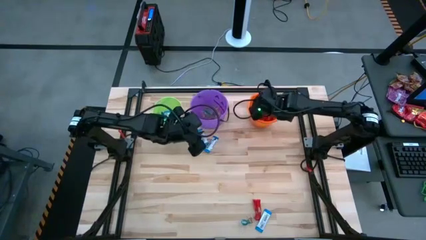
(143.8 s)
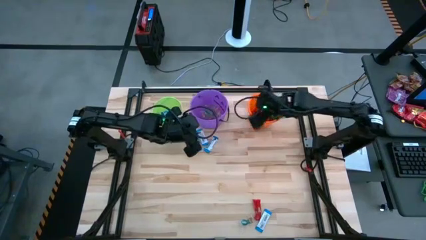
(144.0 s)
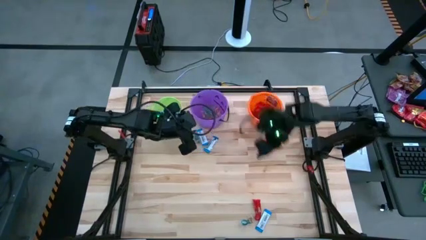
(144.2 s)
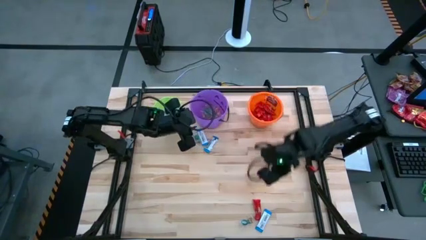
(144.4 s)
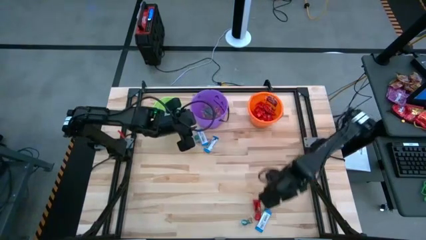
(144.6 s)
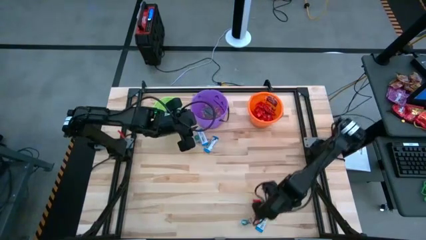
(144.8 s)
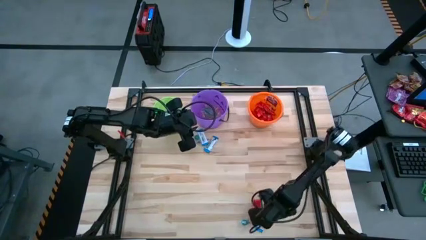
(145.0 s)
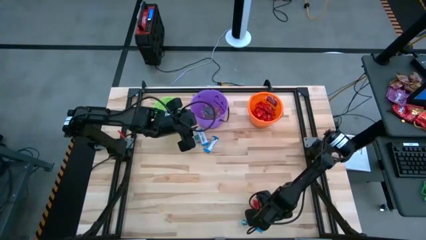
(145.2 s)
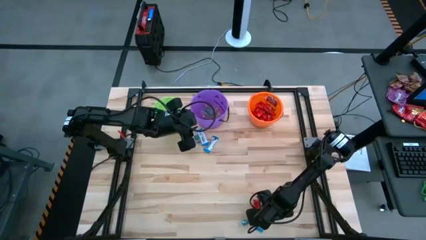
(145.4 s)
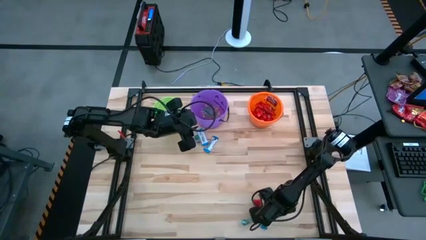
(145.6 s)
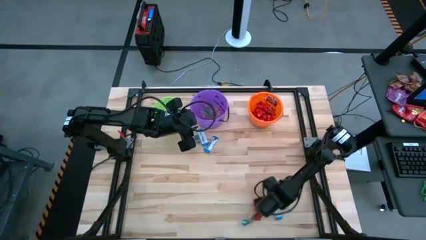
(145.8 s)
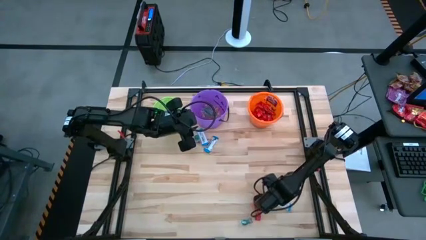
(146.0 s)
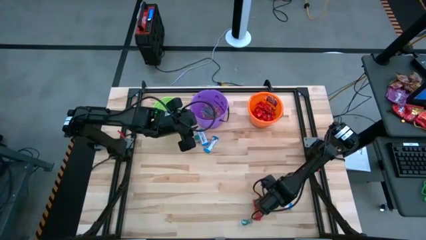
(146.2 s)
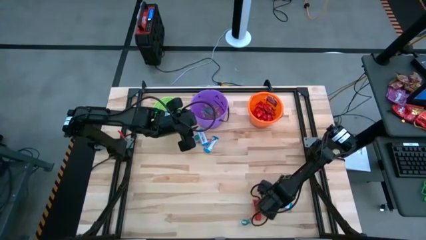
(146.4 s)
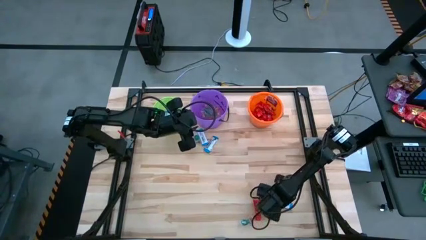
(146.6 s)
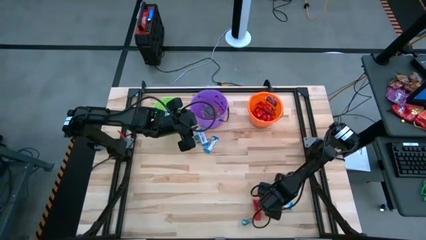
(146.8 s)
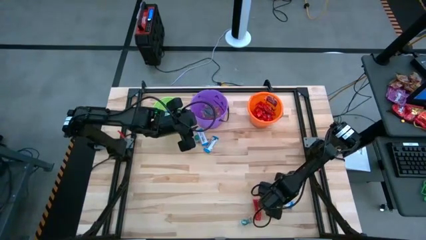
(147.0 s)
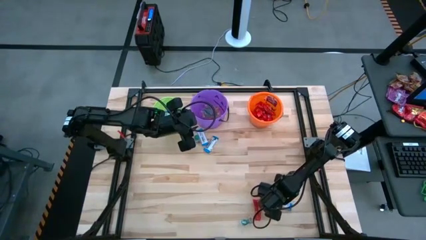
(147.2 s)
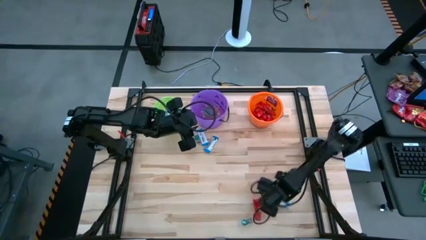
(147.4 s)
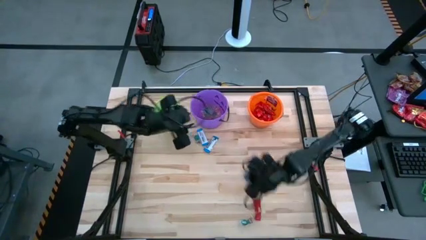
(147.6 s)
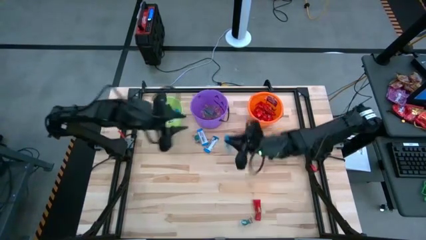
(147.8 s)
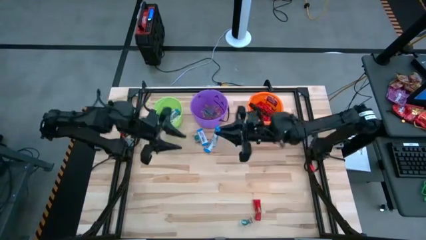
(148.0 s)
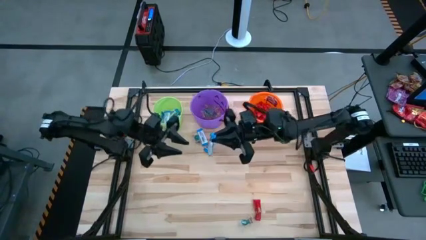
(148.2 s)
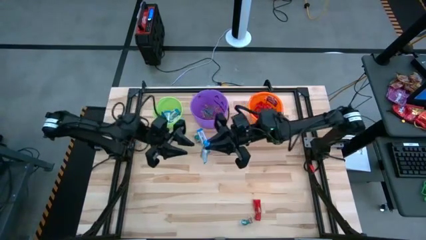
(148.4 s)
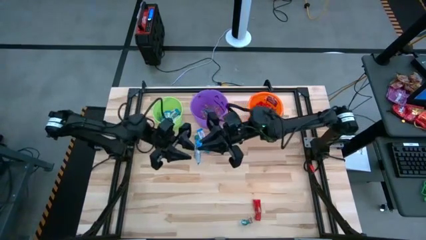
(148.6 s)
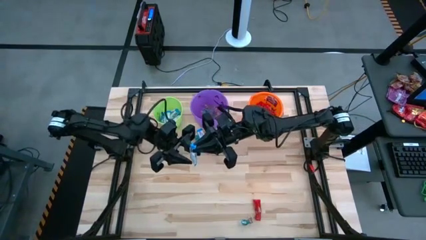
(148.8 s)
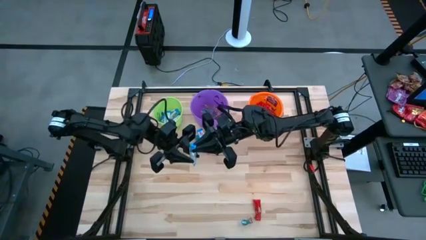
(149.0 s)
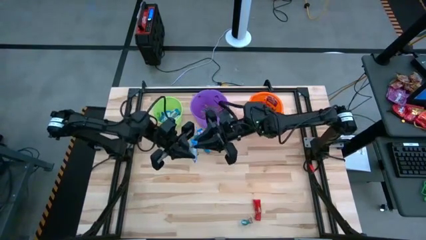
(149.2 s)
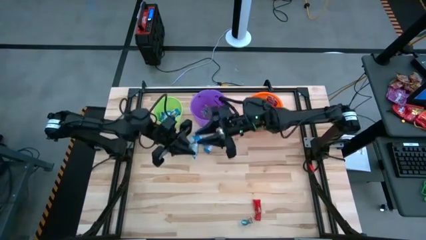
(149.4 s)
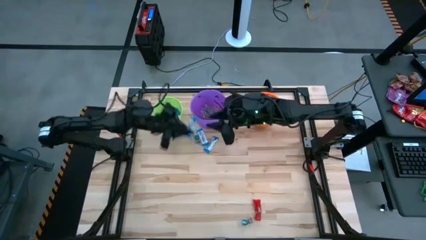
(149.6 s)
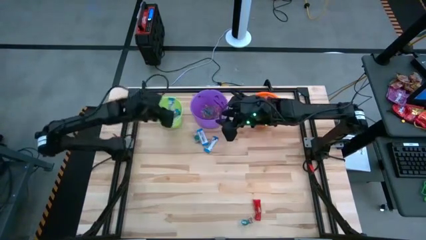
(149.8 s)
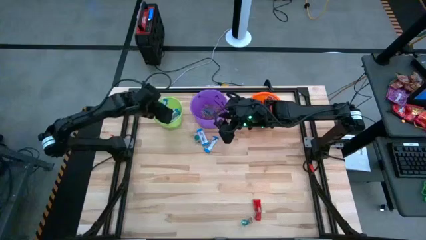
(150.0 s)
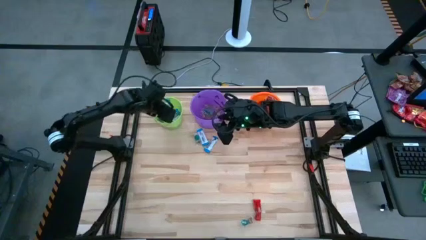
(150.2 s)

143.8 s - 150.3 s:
Task: Sort candy by brand, put in halloween buckets
Put the white chocolate into the green bucket

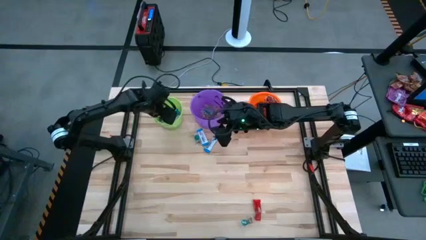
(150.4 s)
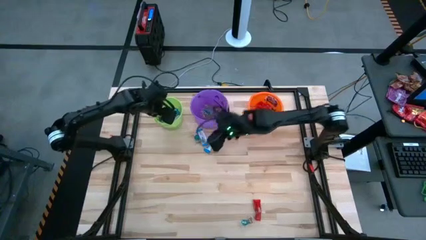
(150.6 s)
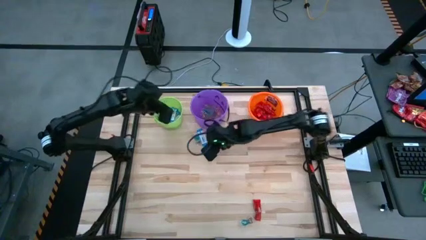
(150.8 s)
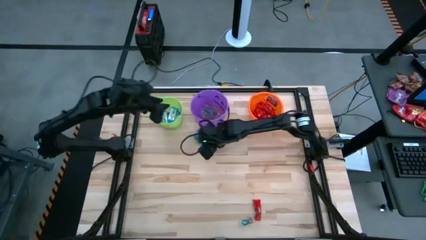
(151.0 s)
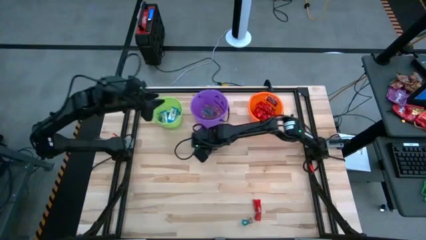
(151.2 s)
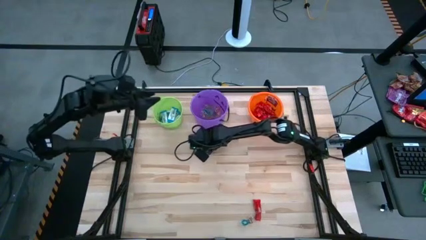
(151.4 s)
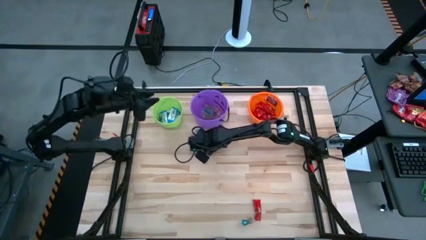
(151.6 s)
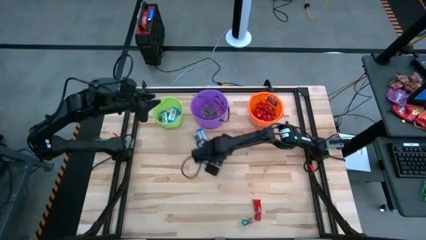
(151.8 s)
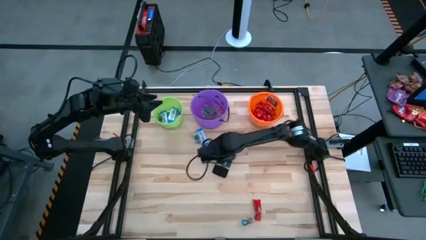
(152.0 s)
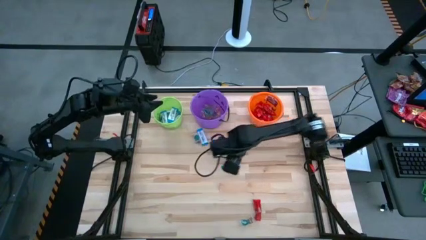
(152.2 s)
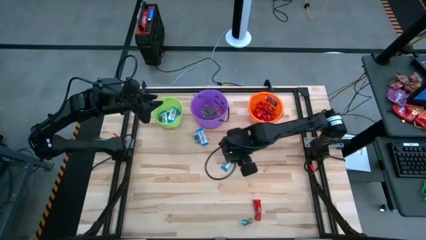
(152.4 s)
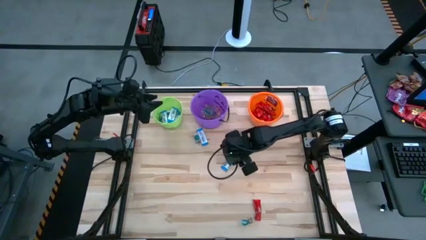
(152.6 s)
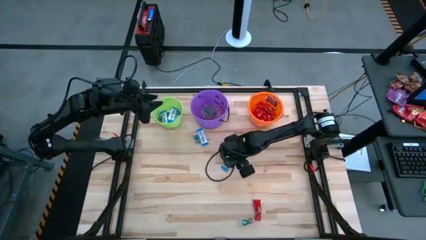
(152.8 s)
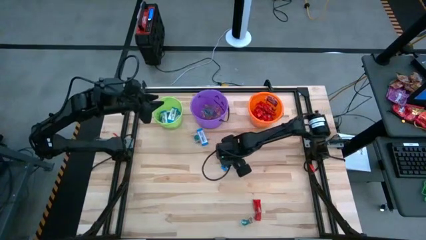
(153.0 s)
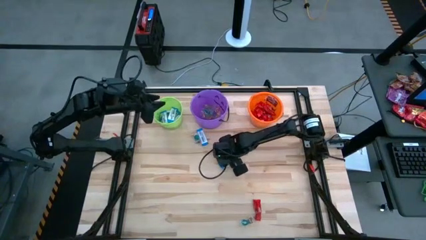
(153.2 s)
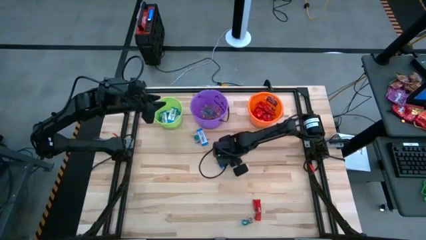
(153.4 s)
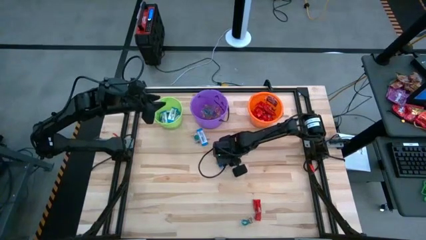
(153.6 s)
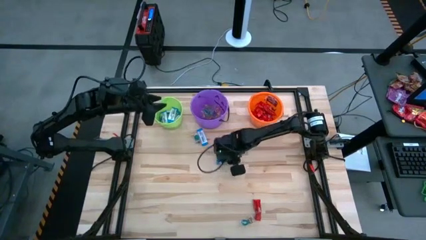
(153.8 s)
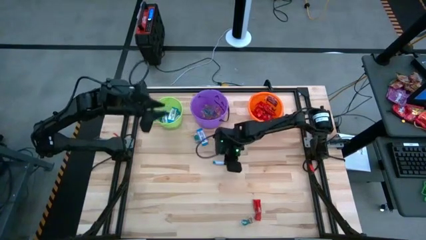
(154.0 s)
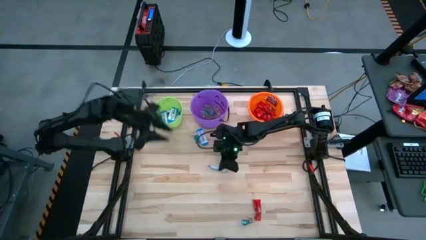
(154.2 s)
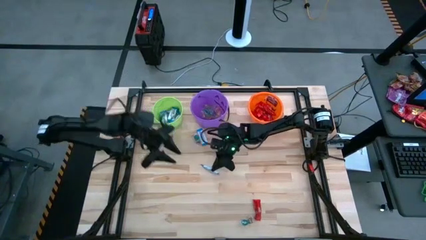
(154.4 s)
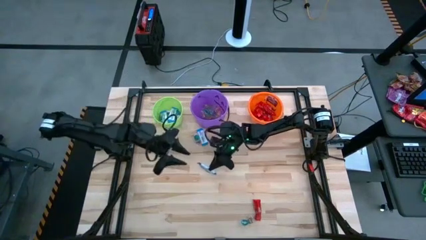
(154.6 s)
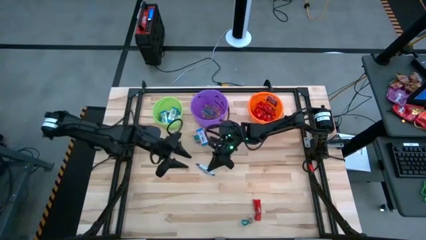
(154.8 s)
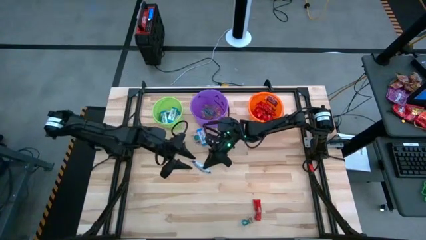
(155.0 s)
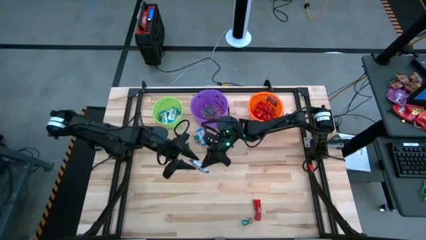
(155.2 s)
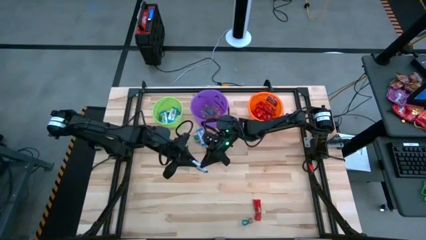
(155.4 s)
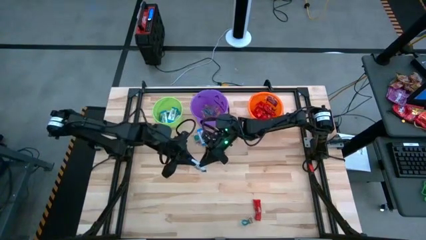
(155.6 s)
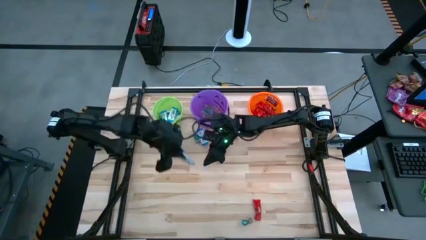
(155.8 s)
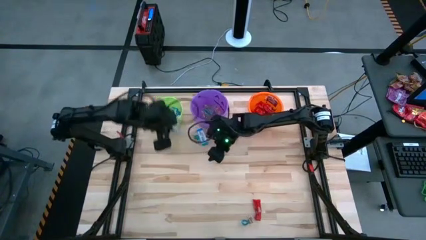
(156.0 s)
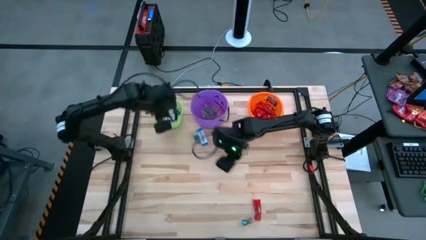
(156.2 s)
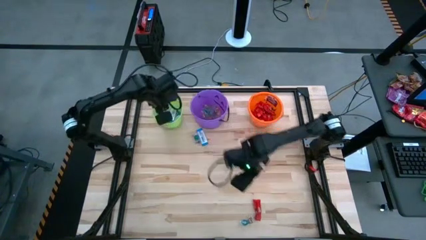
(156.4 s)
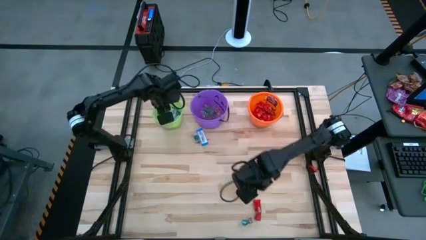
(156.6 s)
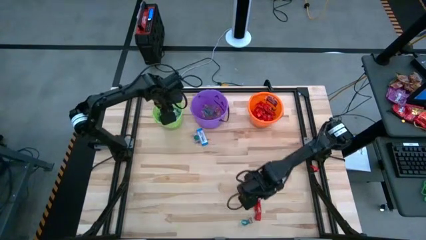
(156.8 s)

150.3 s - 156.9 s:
Put the white chocolate into the green bucket

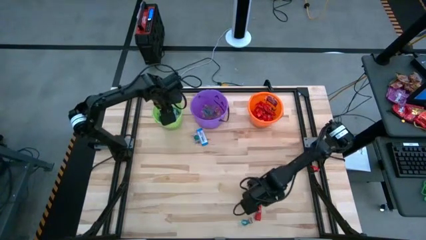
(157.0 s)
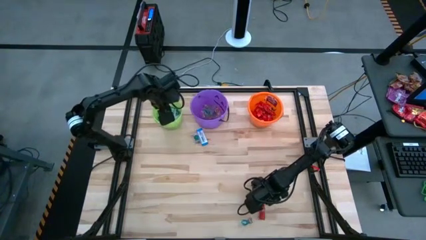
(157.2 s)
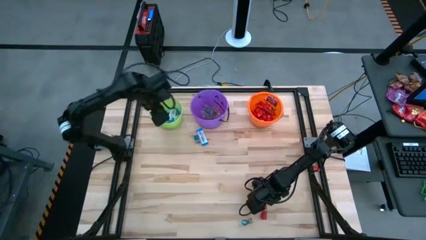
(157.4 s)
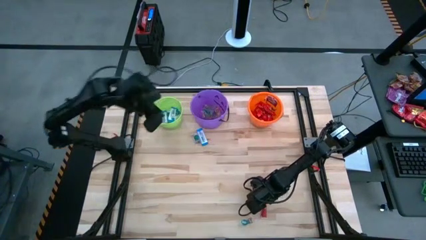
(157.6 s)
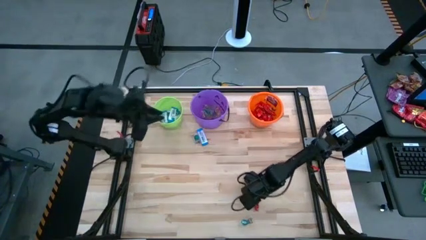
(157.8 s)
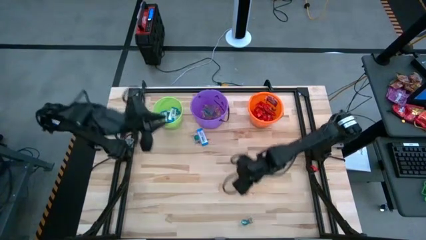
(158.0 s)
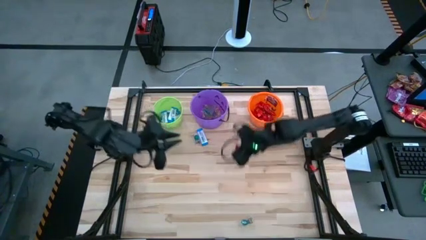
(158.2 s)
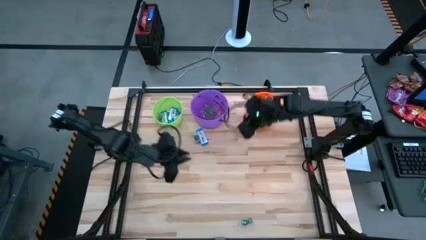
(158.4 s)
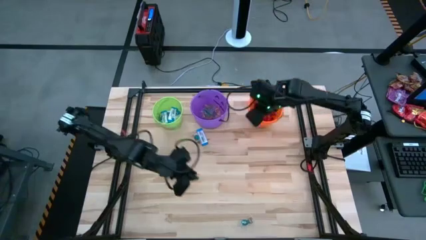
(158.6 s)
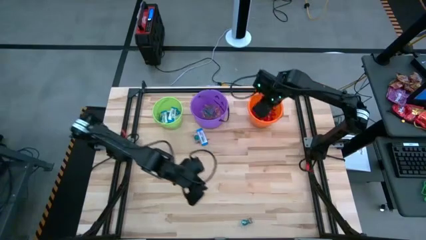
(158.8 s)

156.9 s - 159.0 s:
Put the red chocolate into the orange bucket

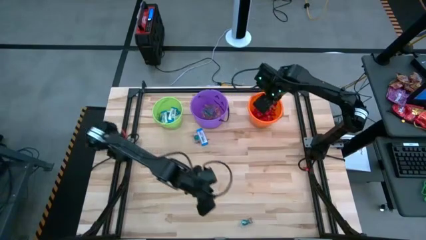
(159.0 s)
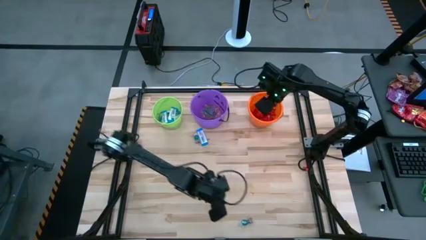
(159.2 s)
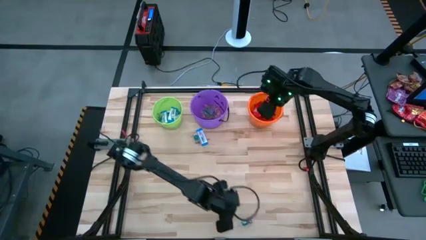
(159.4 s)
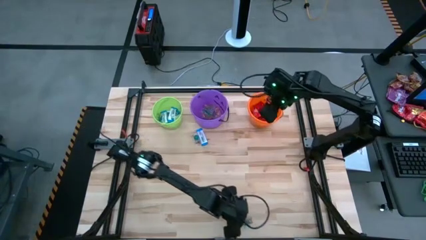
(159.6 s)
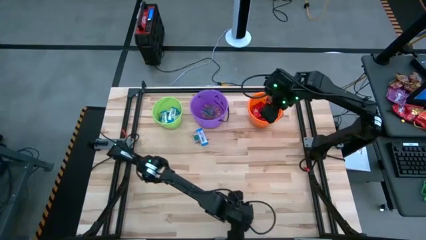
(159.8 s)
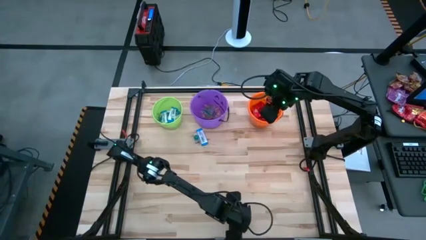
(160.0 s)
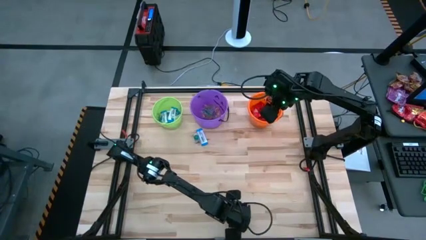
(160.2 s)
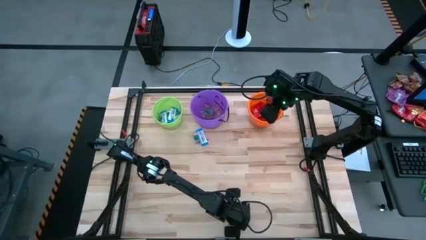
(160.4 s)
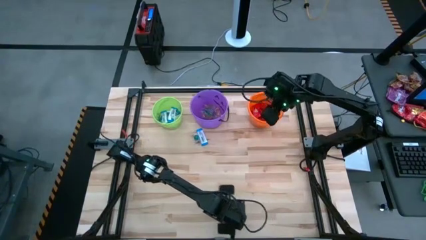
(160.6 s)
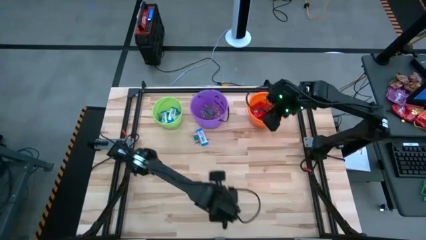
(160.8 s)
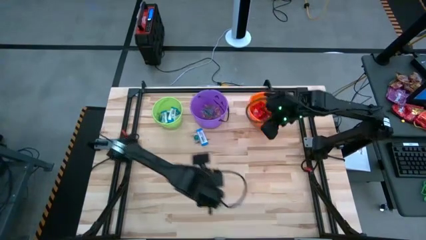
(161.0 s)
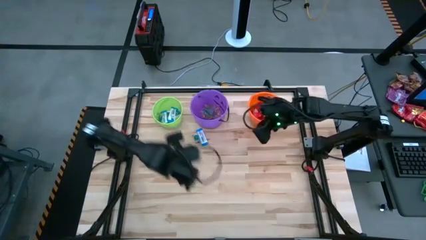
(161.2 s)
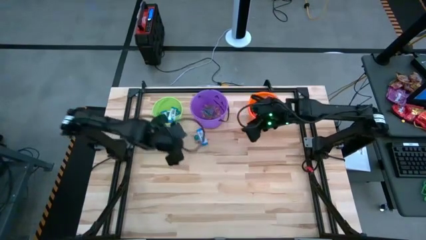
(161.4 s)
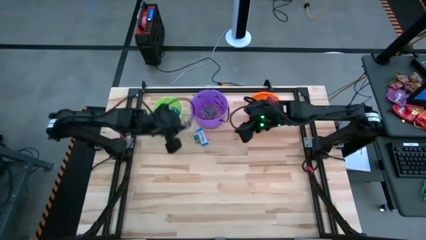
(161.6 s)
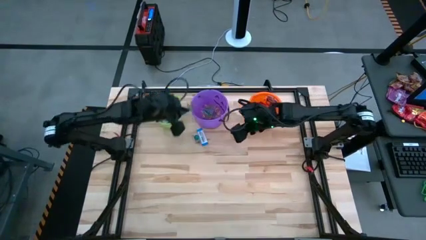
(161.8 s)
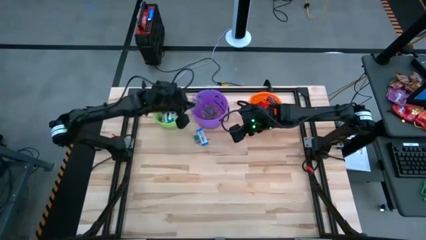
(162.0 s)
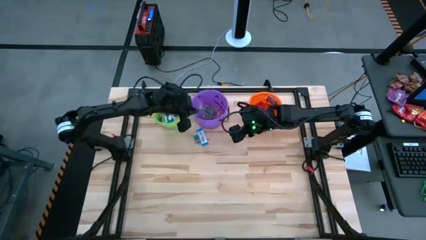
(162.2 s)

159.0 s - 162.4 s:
Put the blue gummy into the purple bucket
